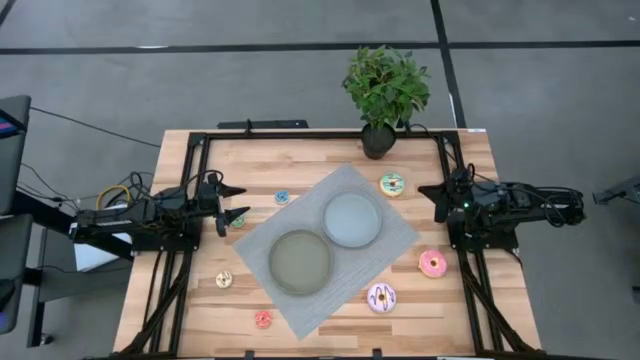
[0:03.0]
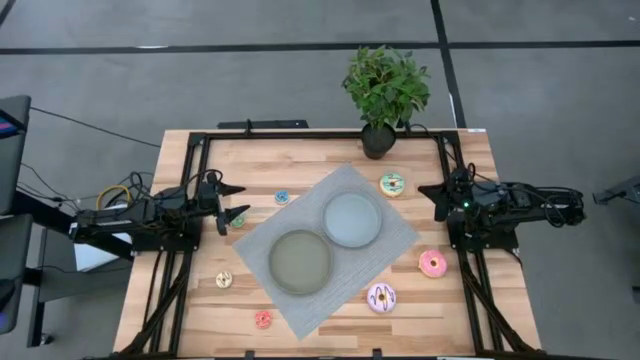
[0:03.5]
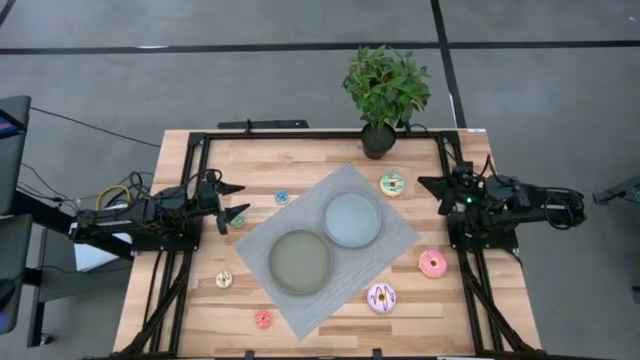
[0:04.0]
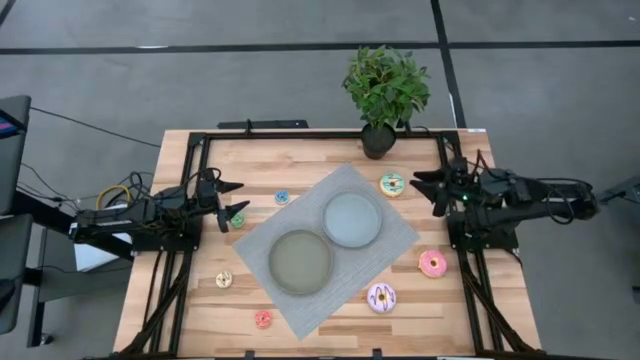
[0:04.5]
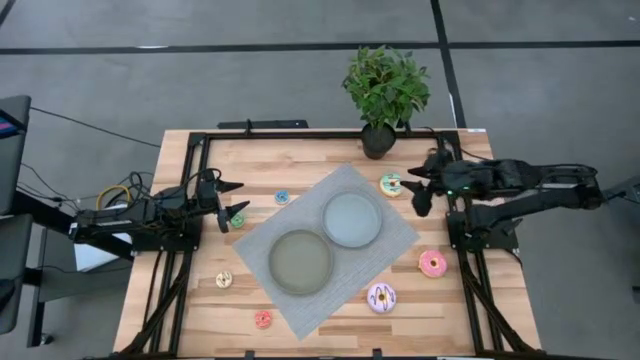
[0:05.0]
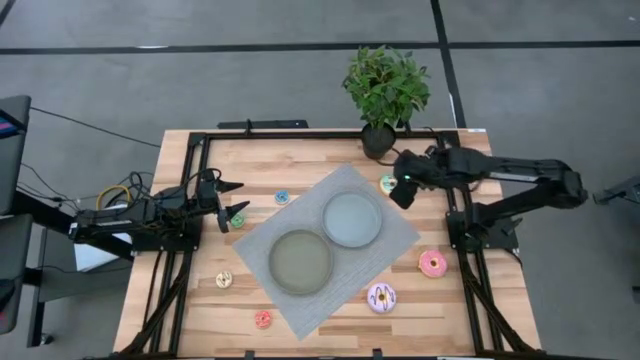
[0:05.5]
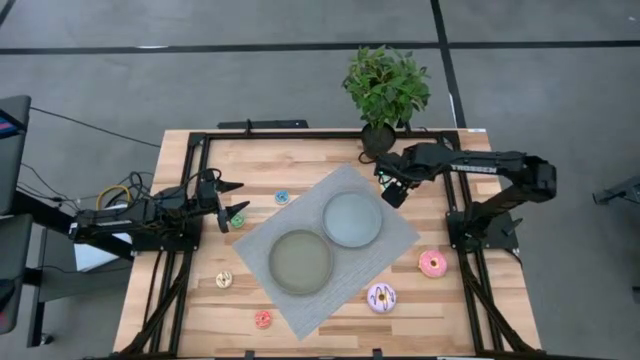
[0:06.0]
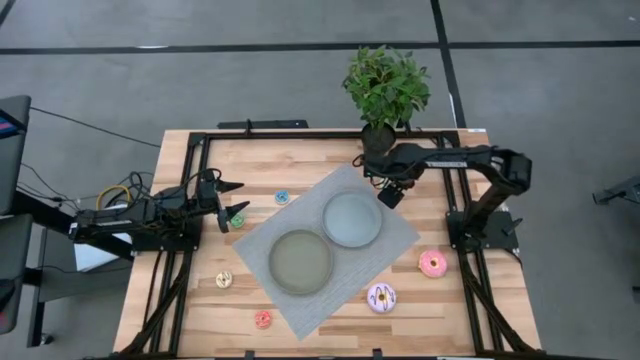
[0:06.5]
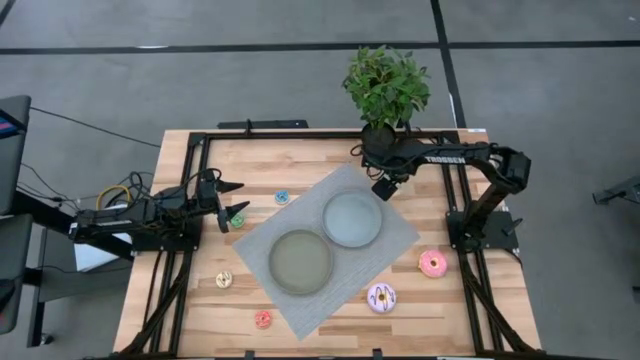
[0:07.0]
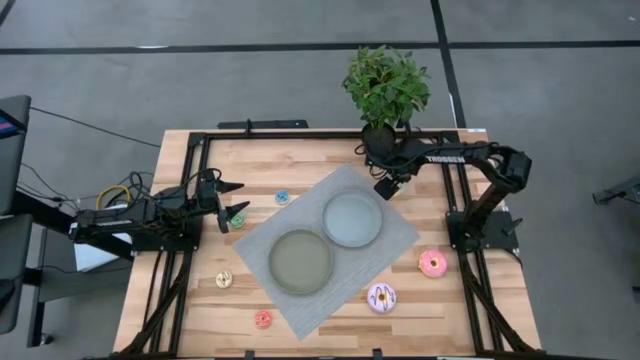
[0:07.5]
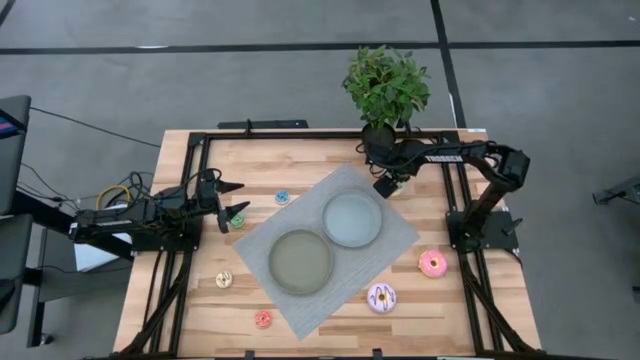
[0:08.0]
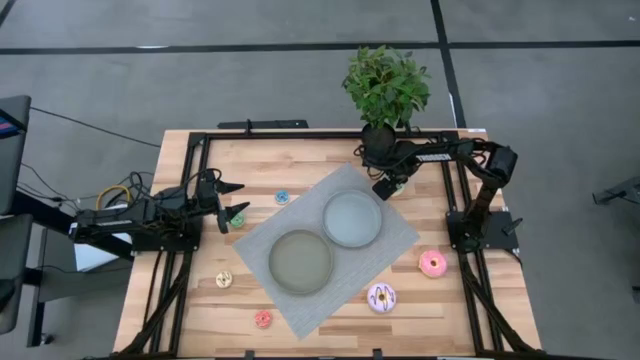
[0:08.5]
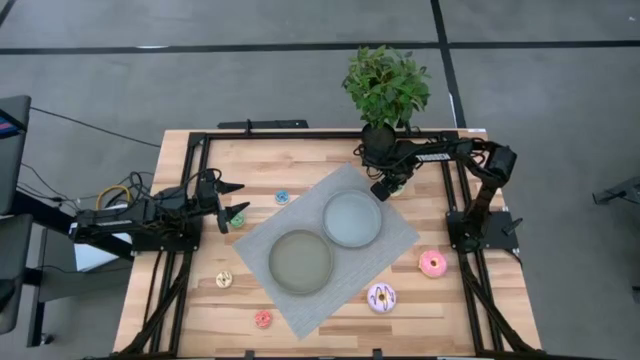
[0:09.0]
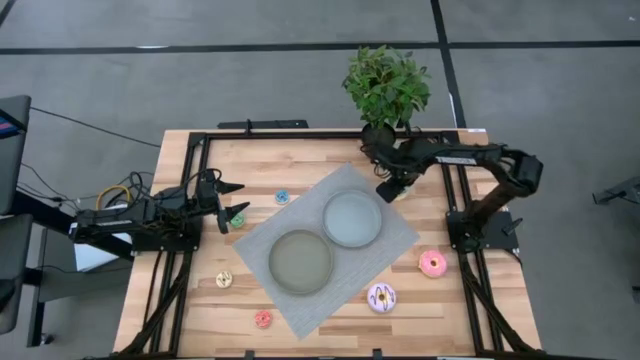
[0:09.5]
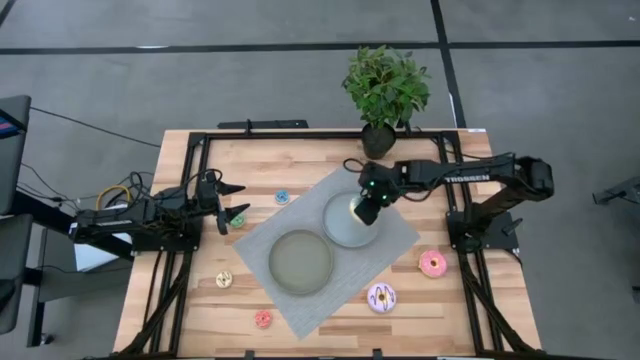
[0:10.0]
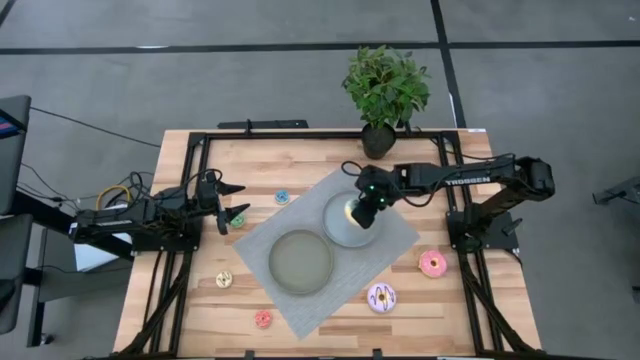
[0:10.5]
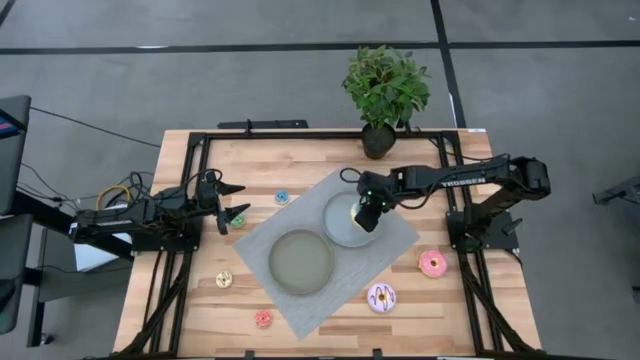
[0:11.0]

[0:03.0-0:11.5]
Task: Pick & Place donuts
Put the big blue donut on the gray plate

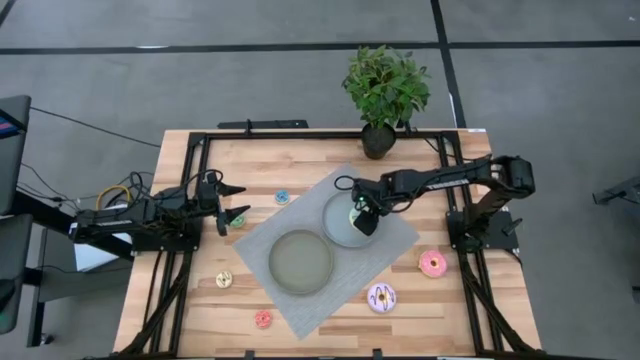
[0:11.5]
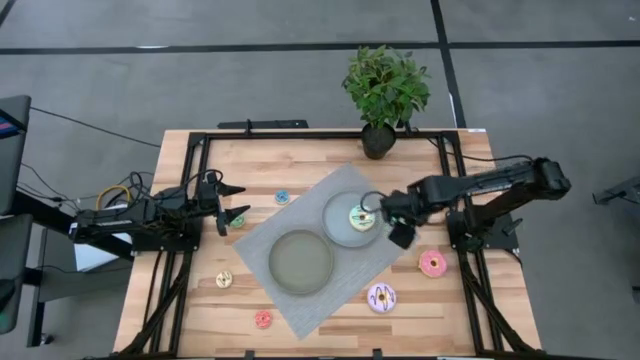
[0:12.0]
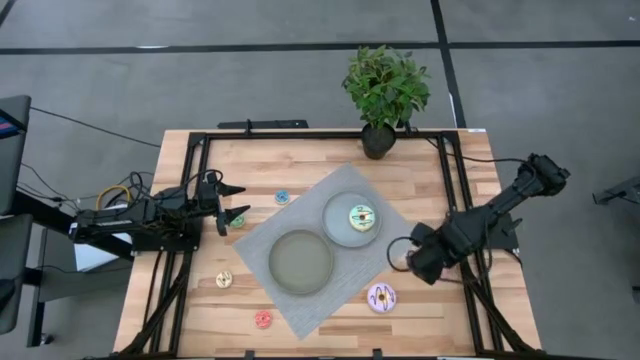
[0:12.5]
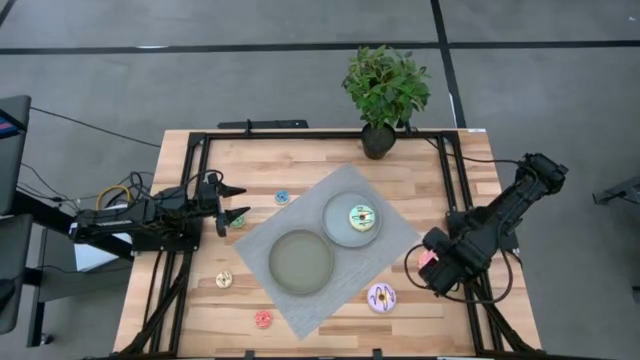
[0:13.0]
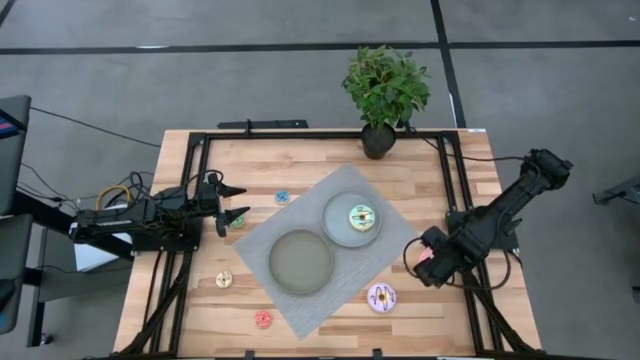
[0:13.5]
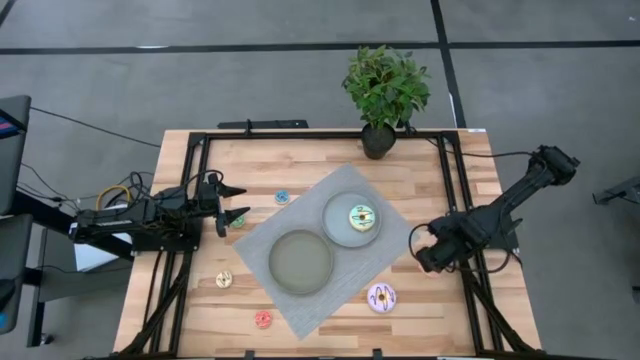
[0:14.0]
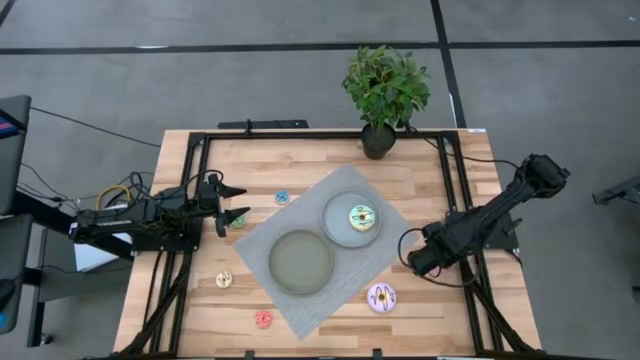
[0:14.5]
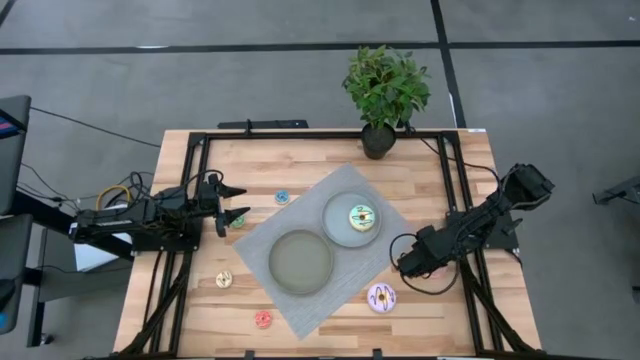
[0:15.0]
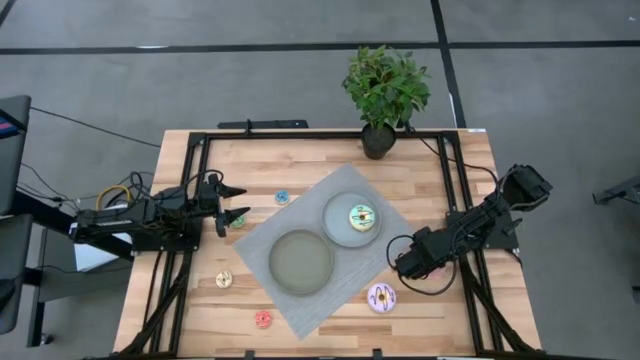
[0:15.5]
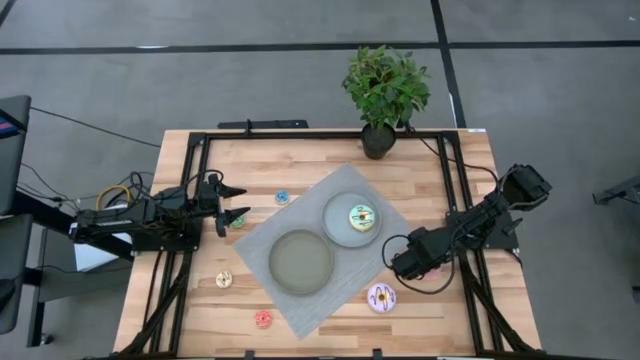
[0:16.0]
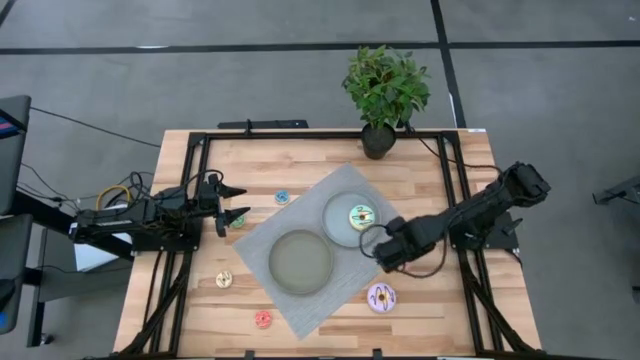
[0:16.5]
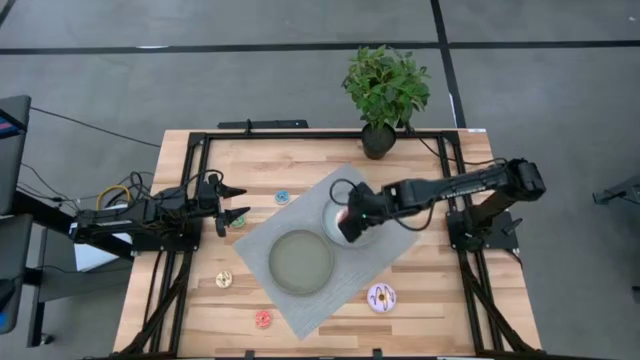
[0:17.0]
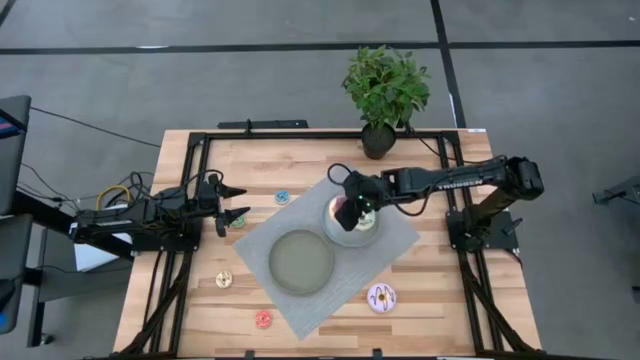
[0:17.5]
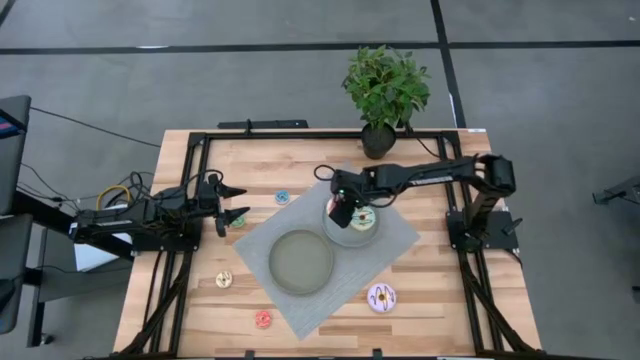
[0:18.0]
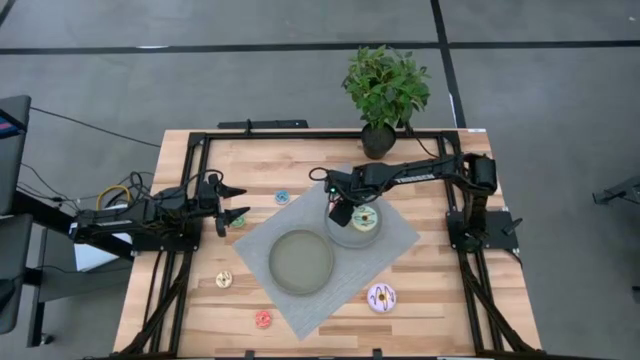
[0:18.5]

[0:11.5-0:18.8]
Put the big pink donut on the gray plate

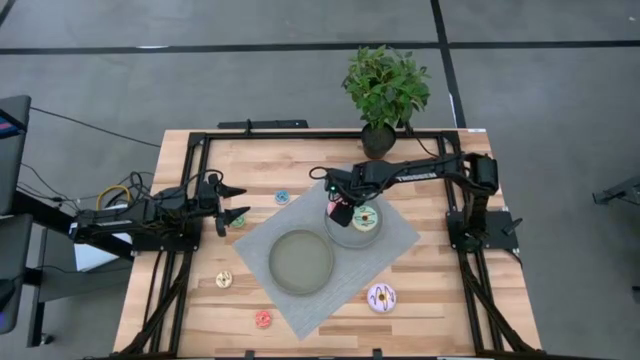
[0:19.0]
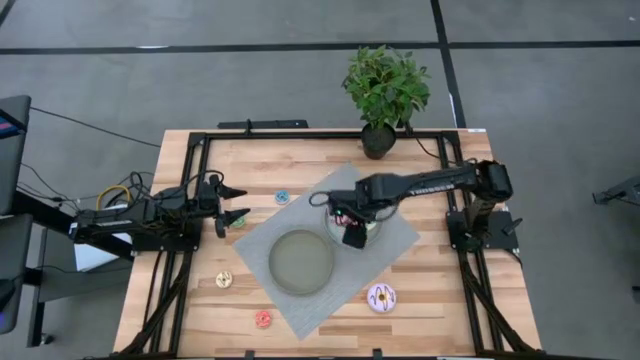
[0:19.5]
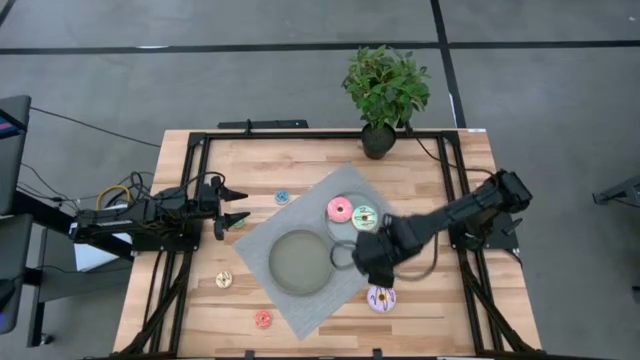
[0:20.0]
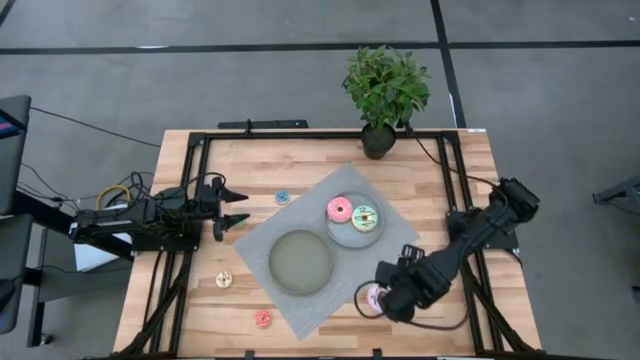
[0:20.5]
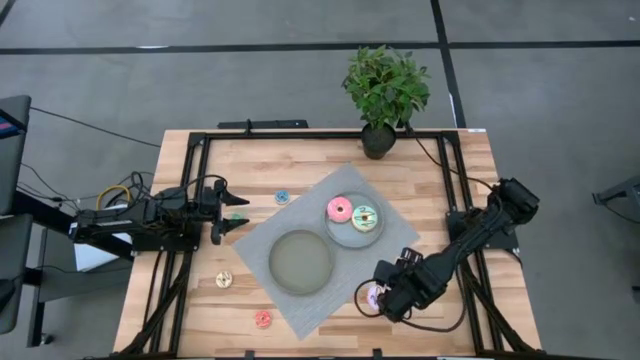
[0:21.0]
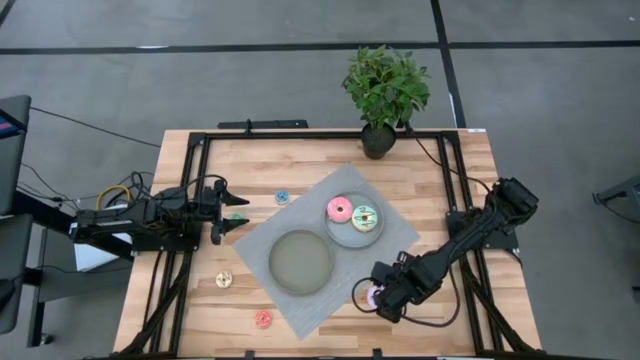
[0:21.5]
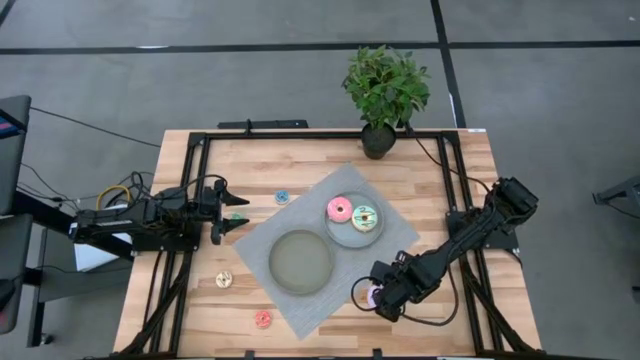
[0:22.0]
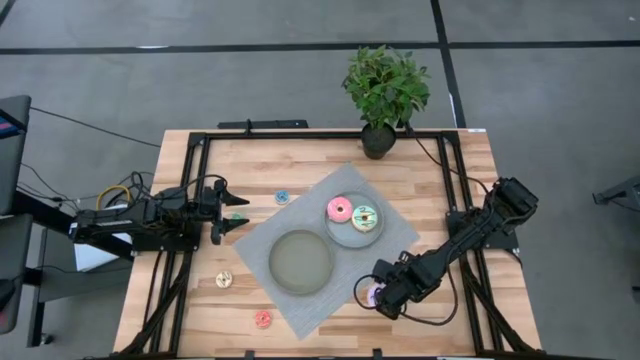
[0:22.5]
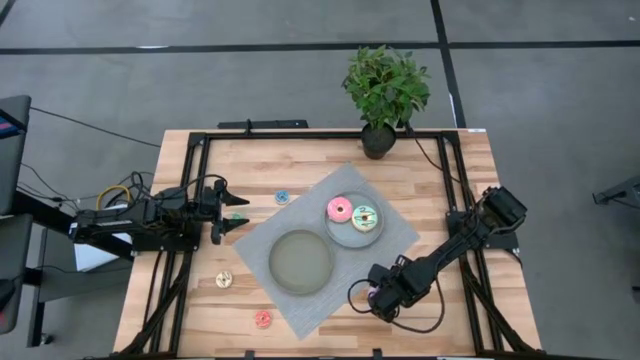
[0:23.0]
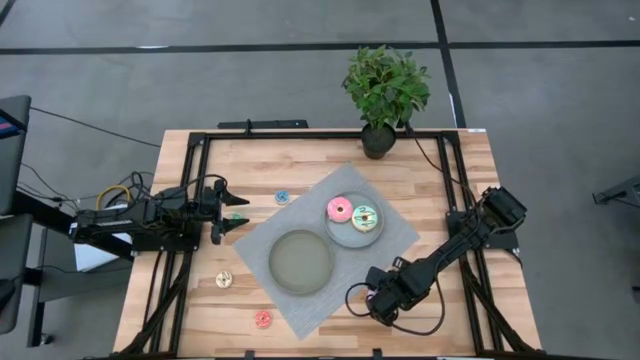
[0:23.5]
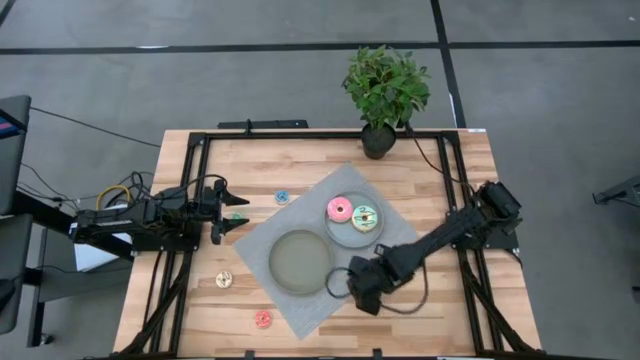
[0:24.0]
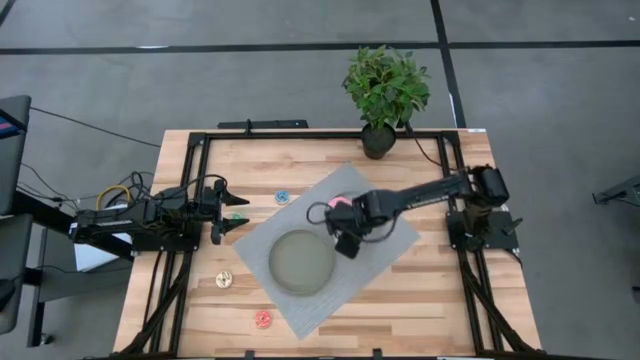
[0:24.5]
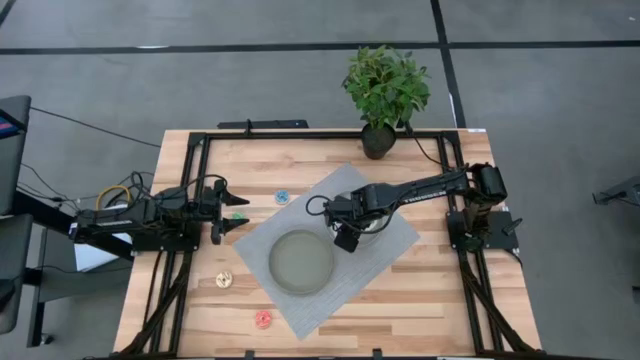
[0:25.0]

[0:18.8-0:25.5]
Put the big purple donut on the gray plate
